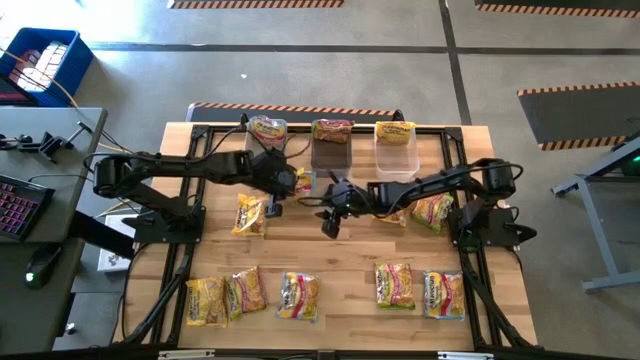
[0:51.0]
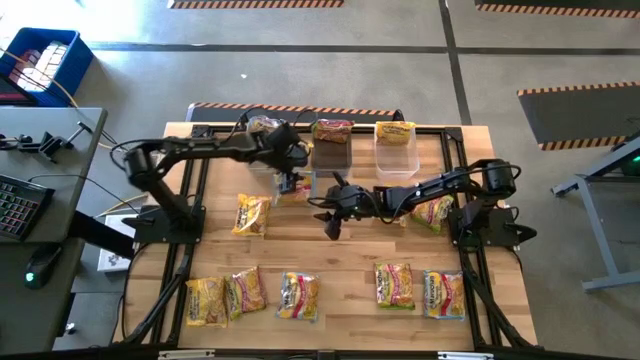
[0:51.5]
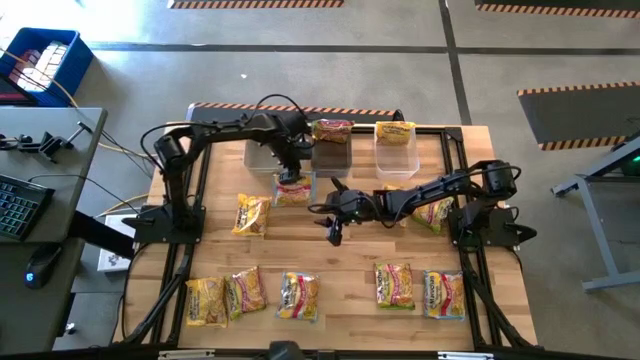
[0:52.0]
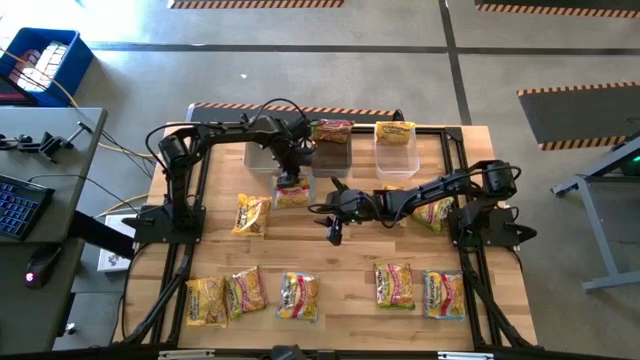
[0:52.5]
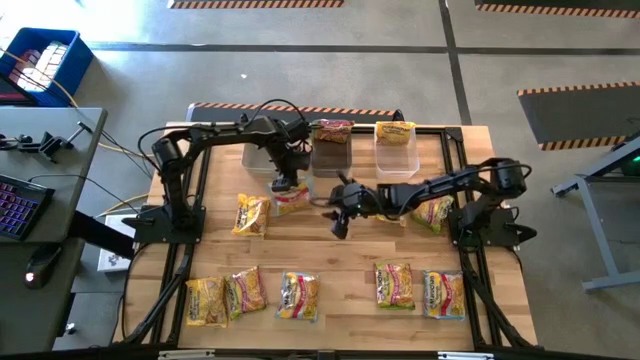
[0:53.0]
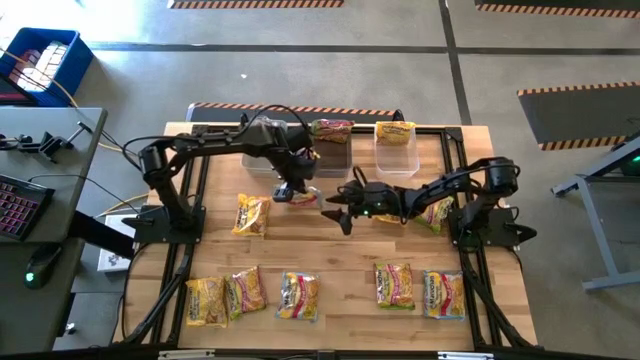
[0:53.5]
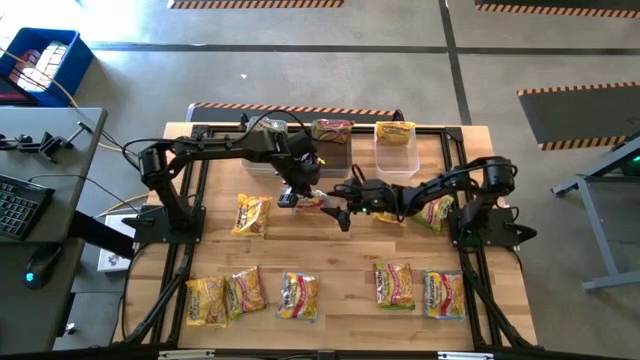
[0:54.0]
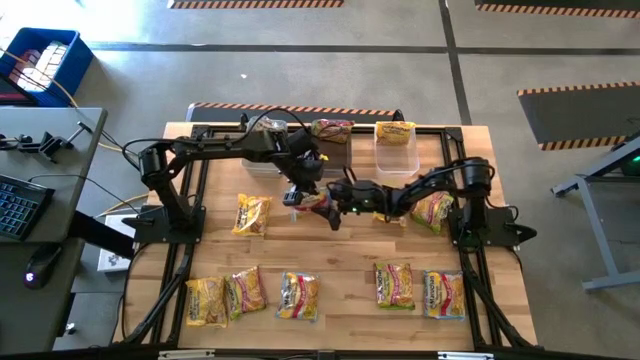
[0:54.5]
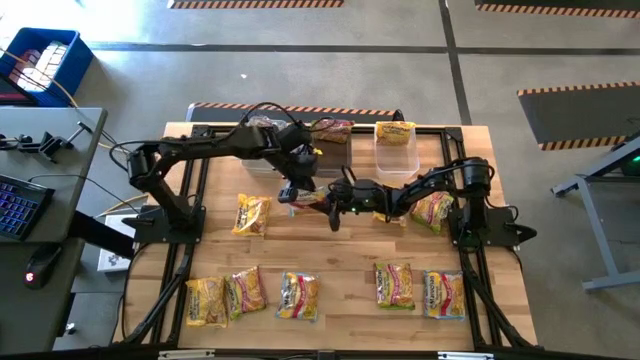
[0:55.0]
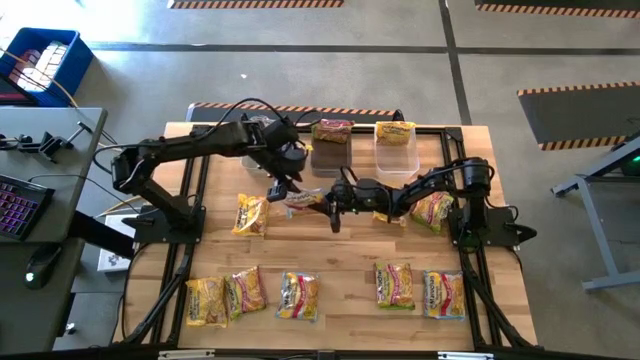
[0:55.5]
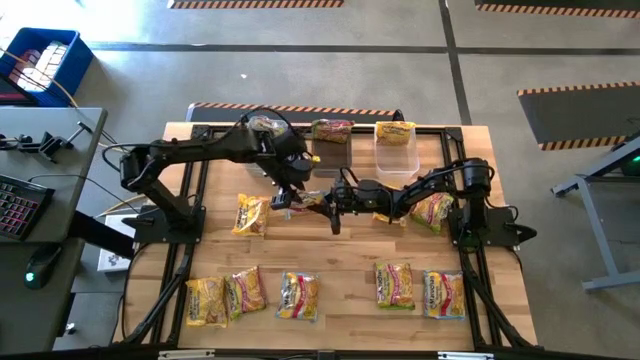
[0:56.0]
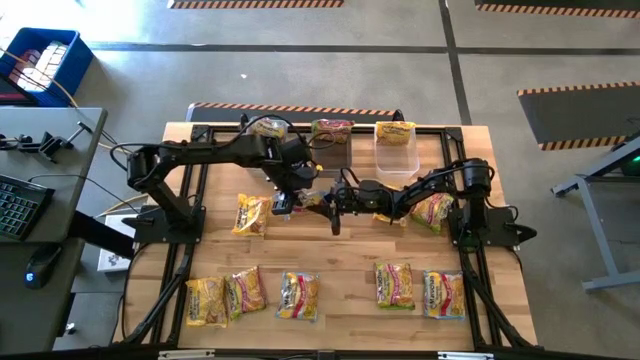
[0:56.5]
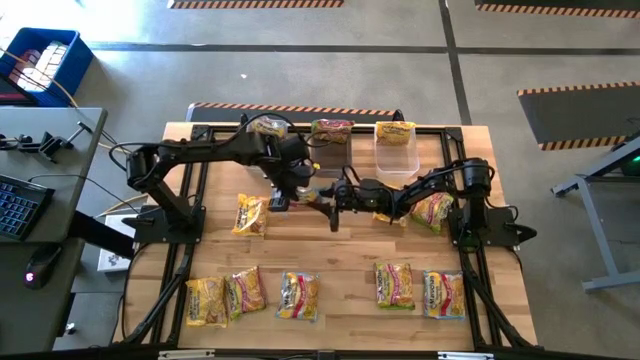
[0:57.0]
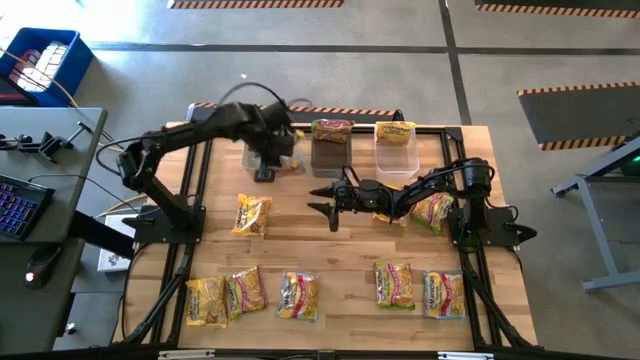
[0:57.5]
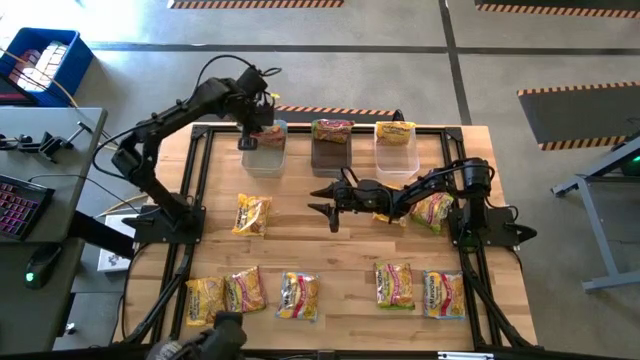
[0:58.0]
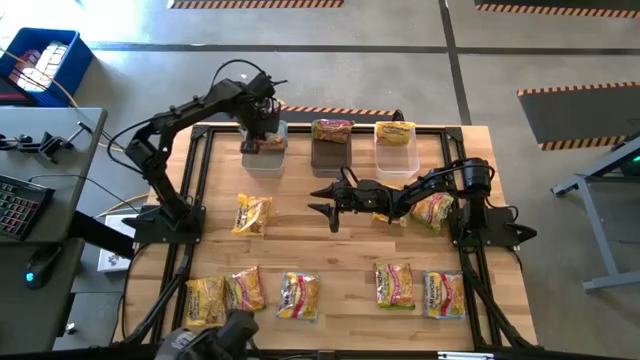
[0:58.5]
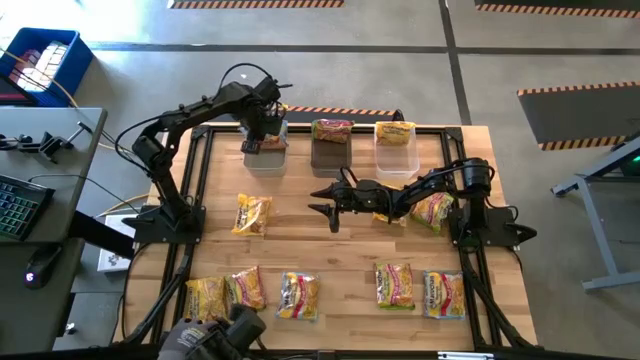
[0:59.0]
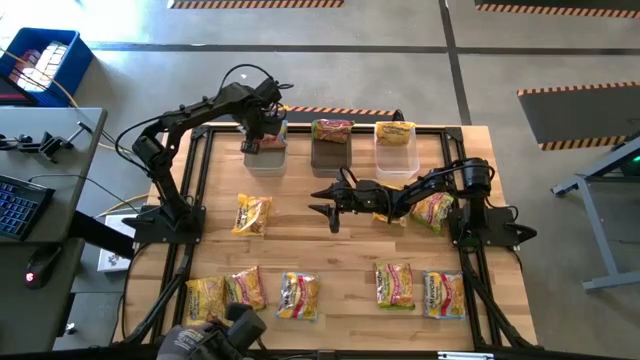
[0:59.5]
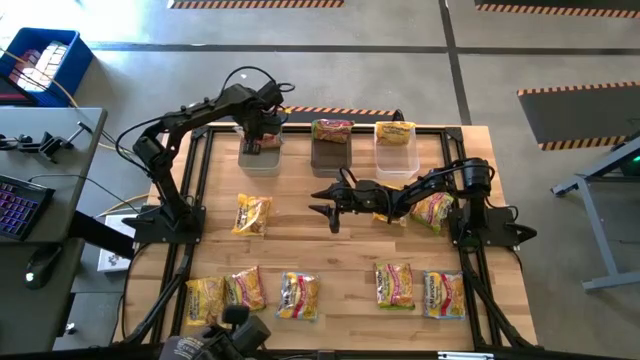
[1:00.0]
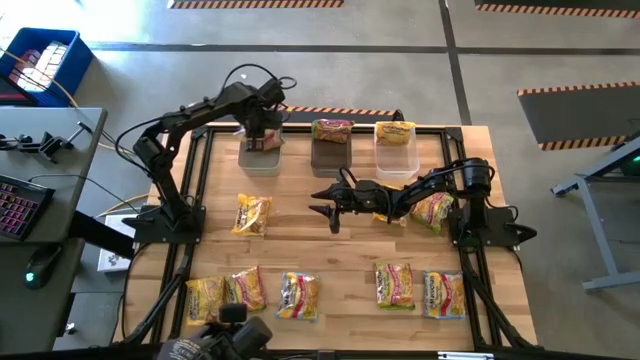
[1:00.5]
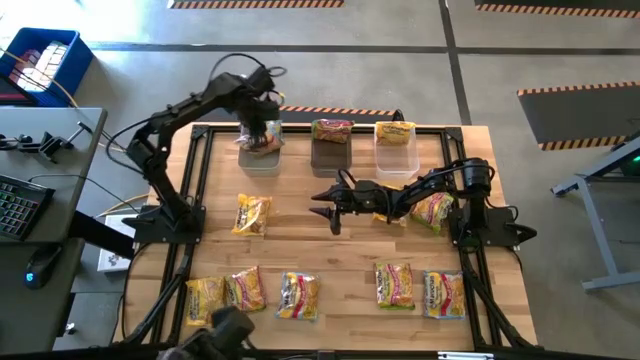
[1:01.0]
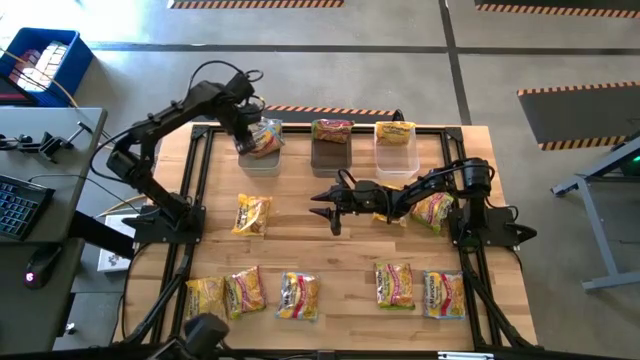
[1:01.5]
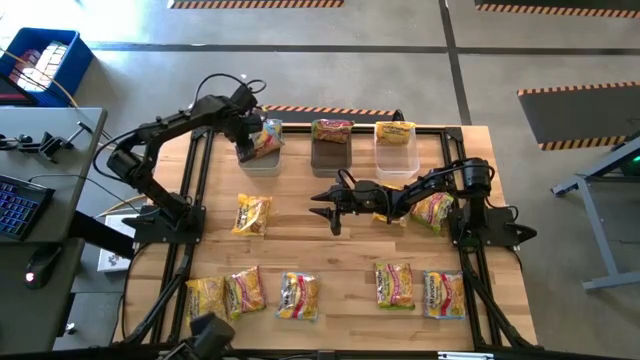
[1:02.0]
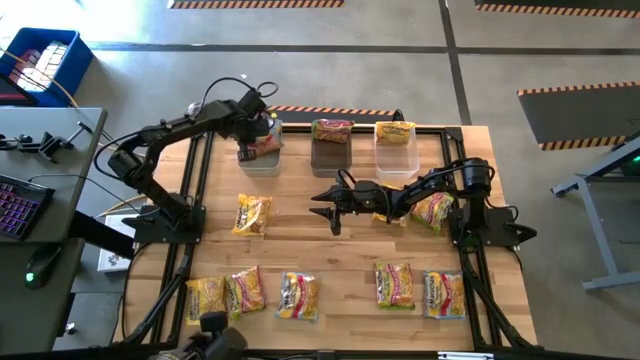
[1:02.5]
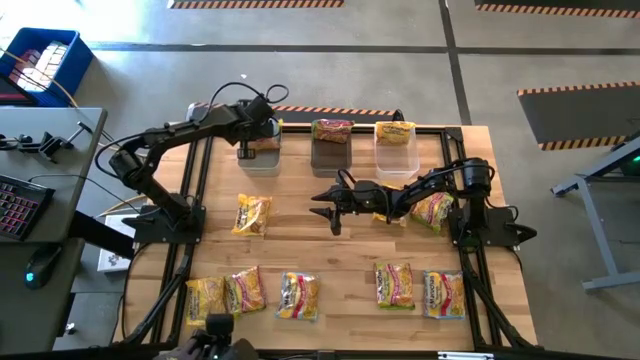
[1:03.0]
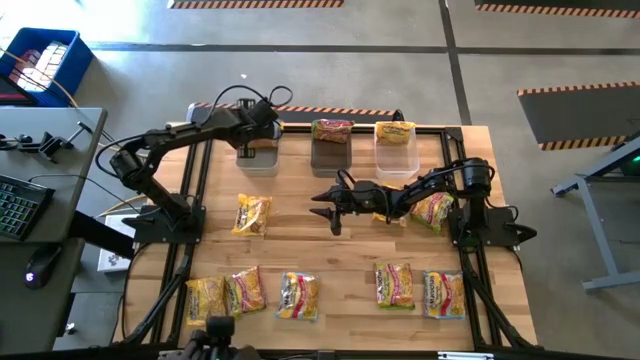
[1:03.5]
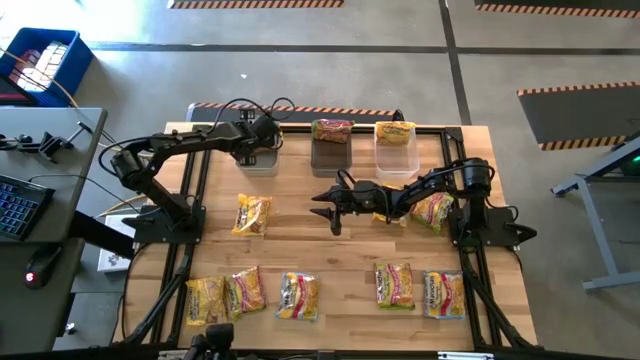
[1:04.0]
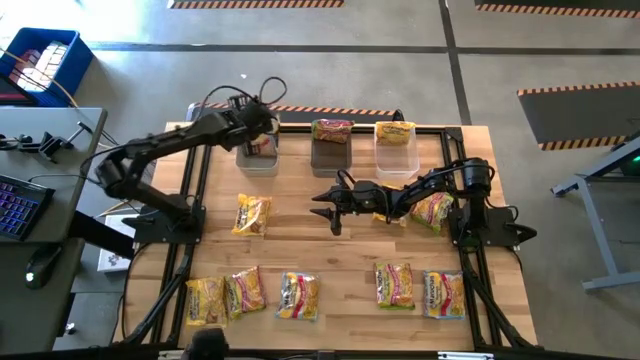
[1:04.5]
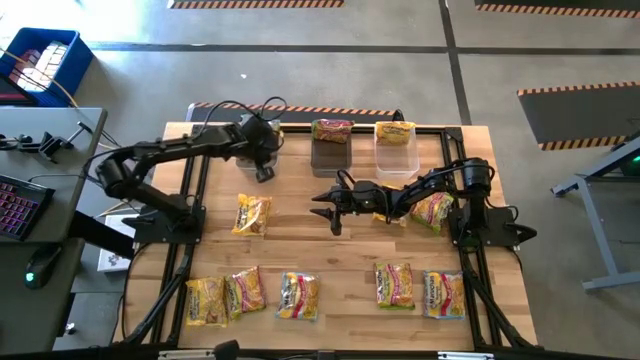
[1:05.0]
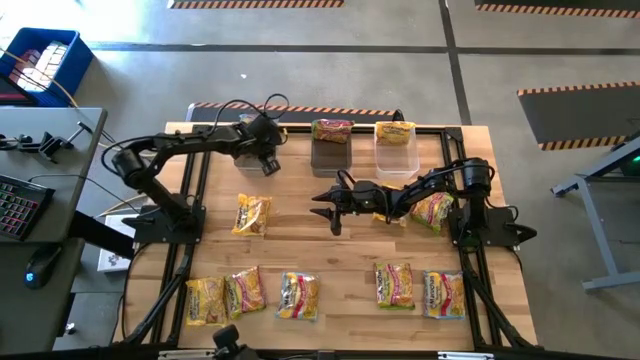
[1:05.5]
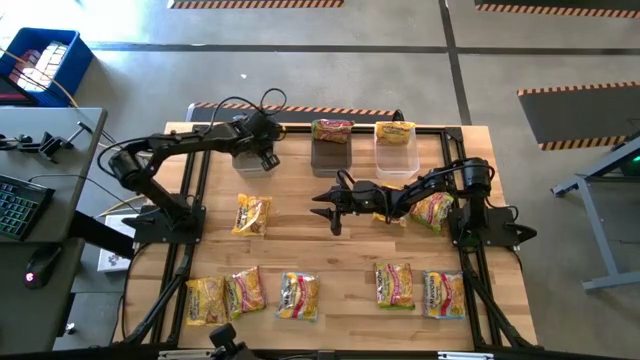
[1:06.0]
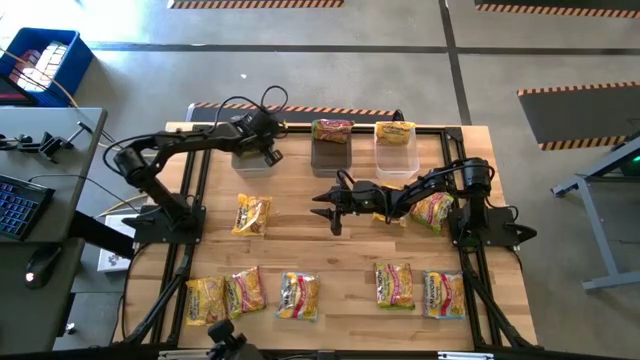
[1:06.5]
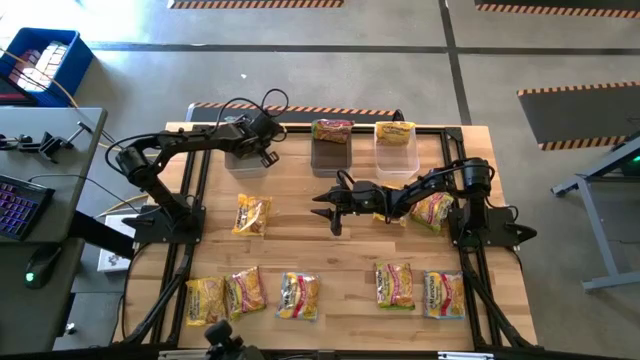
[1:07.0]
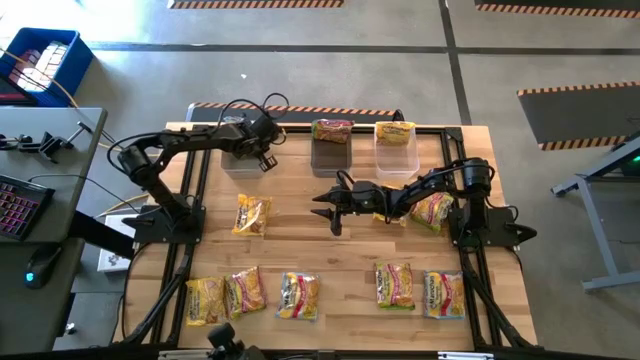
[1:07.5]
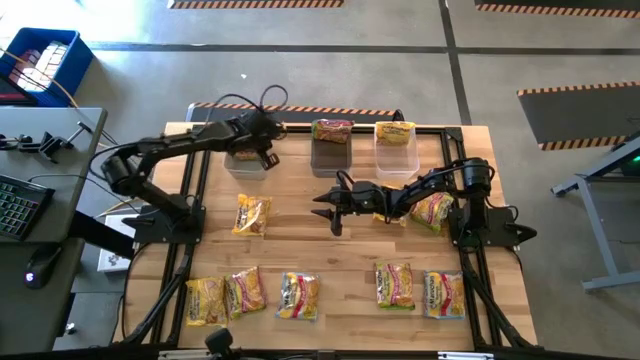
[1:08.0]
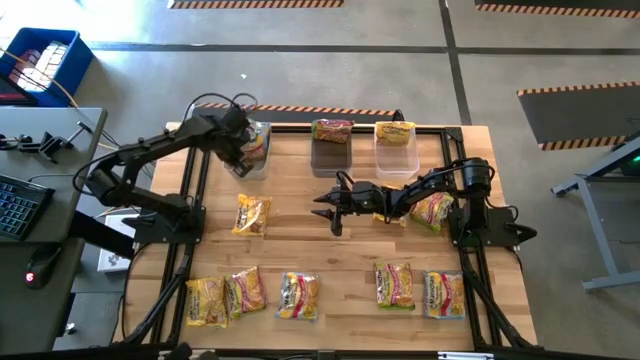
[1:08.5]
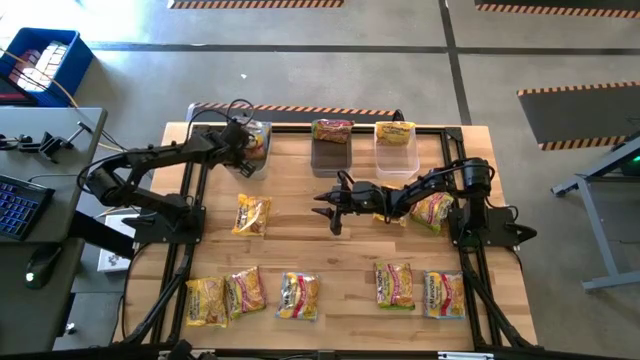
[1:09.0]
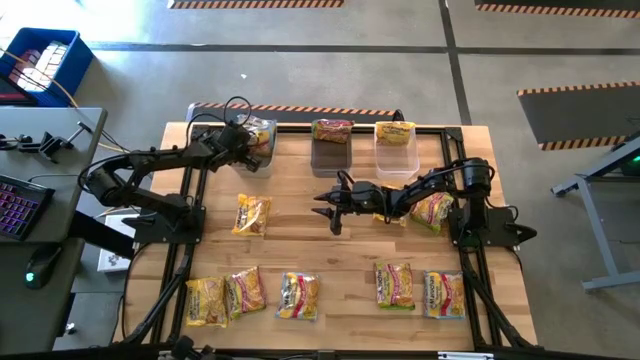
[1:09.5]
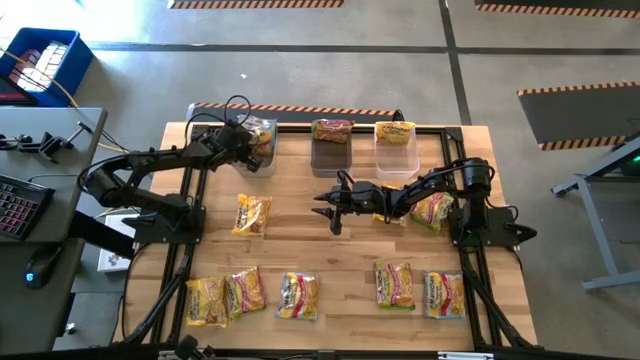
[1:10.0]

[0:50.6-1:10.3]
Task: Sort Maruchan noodles
Put the blue noodle pack into the gray bin

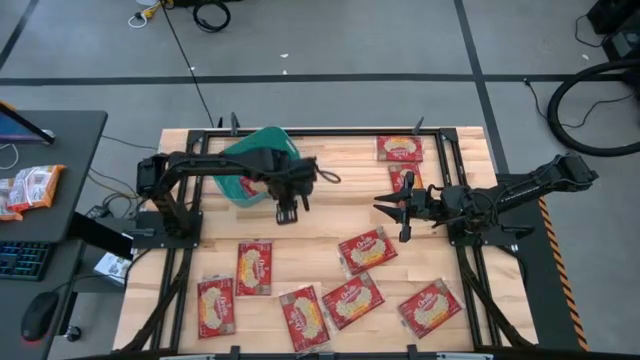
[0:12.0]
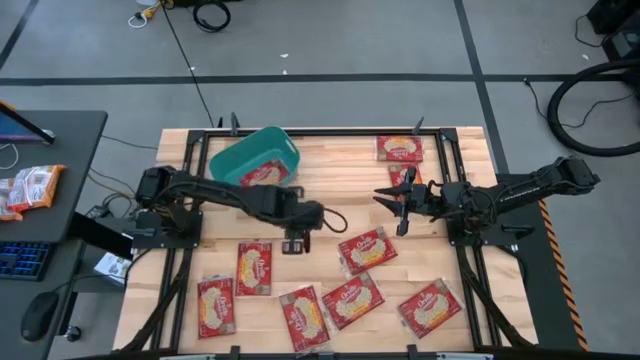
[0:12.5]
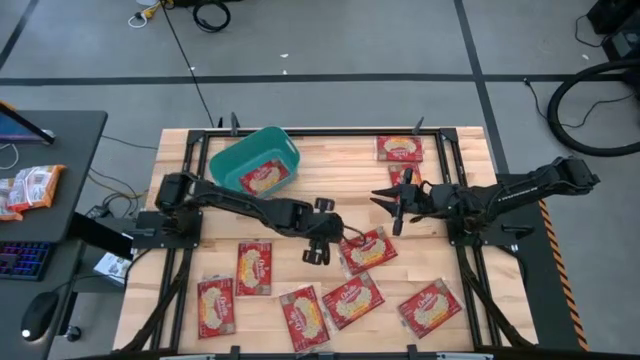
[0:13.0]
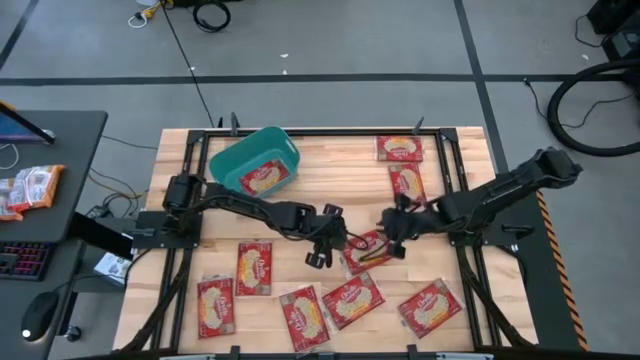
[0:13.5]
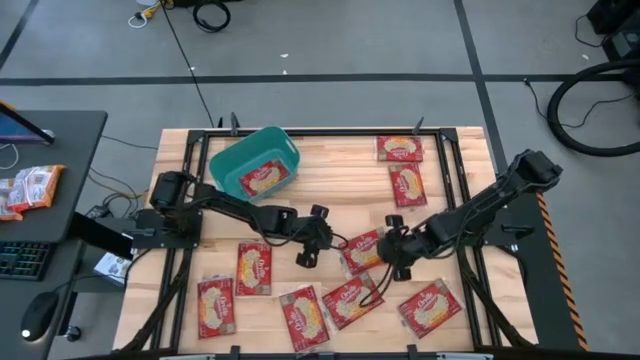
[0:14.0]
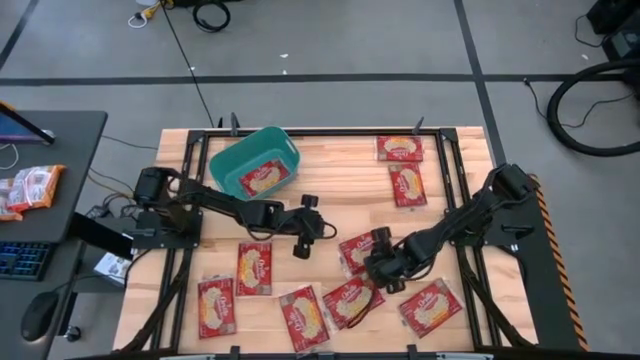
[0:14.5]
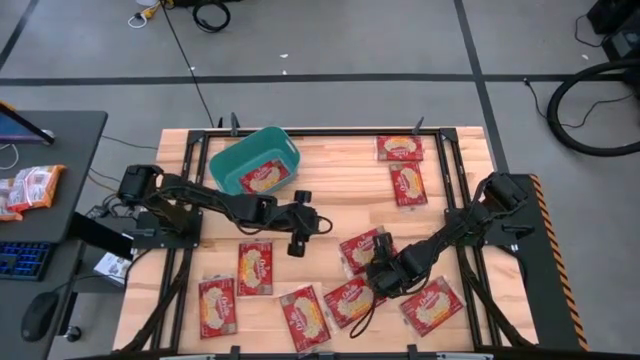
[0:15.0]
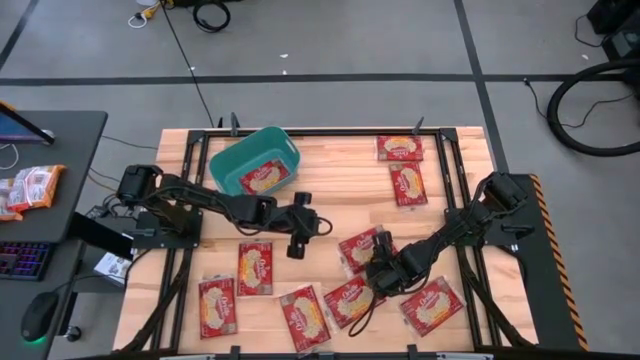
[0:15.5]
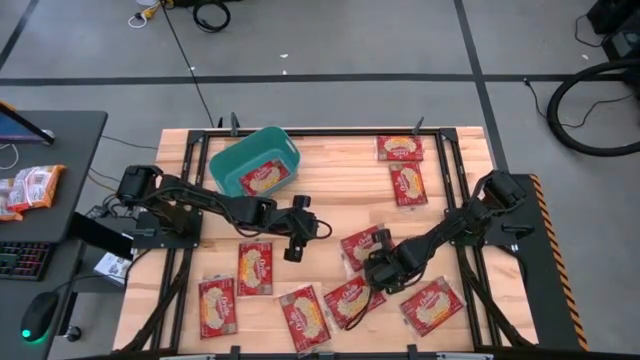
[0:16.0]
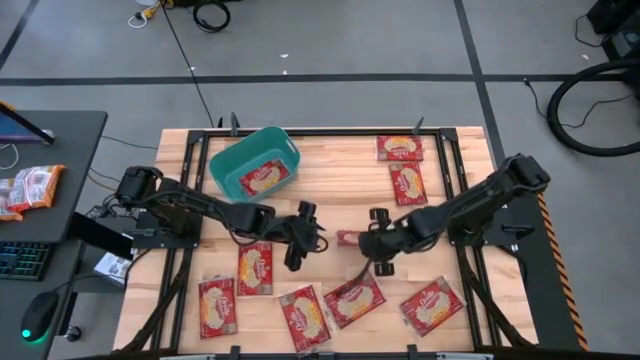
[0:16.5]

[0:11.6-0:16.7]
Task: Sort popcorn bags into baskets
Put the popcorn bag into the bin
